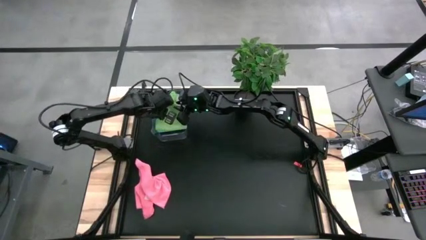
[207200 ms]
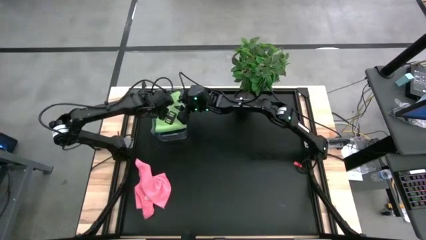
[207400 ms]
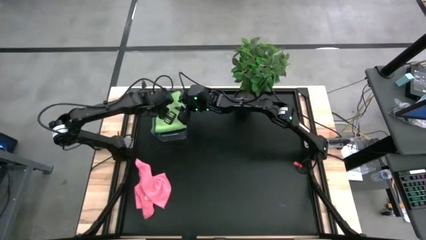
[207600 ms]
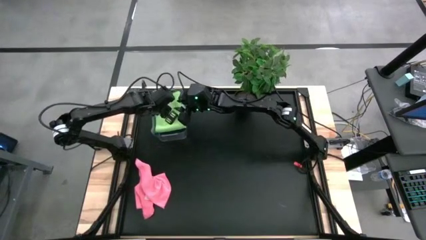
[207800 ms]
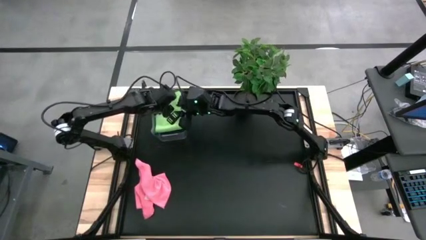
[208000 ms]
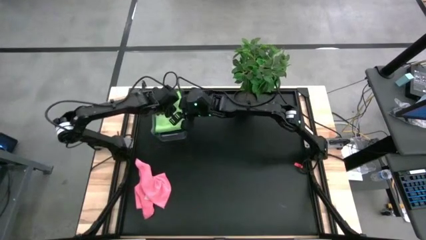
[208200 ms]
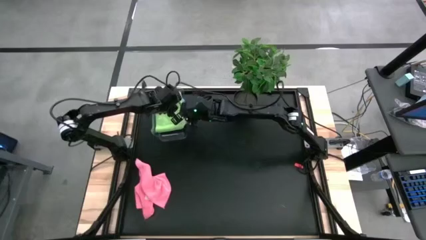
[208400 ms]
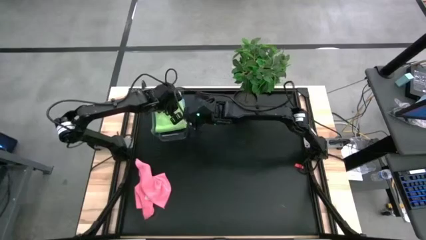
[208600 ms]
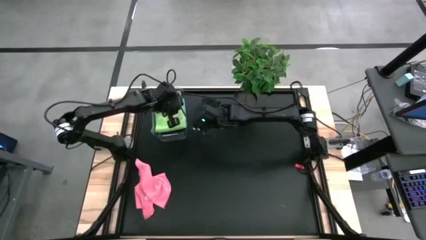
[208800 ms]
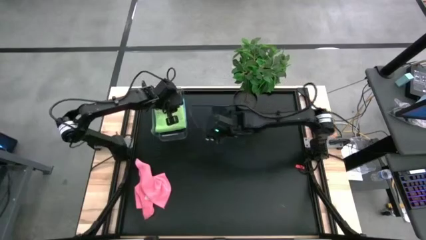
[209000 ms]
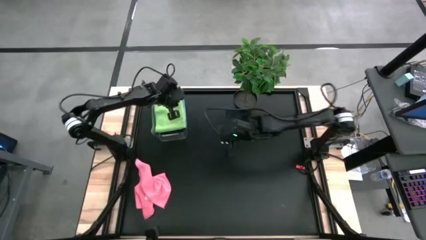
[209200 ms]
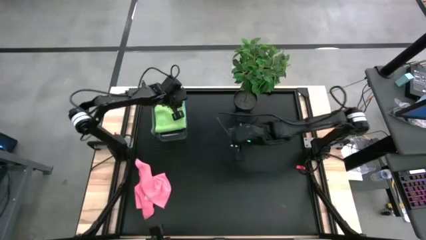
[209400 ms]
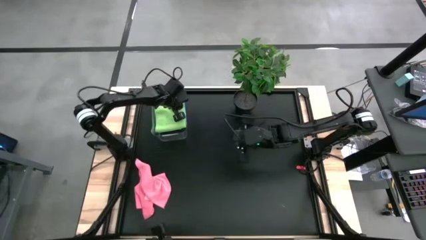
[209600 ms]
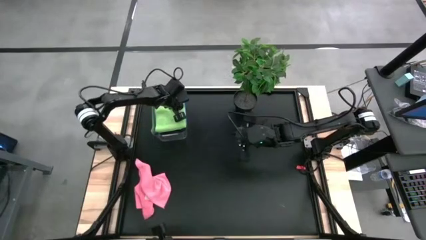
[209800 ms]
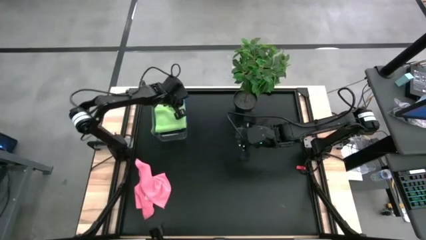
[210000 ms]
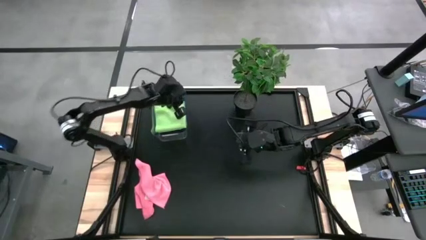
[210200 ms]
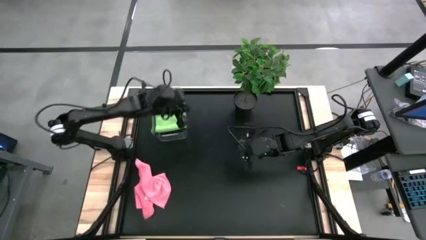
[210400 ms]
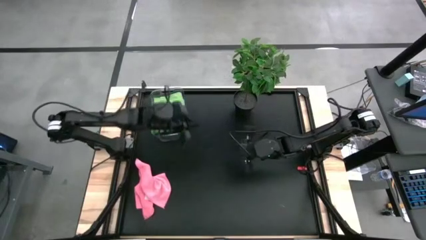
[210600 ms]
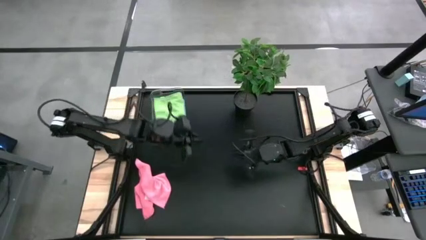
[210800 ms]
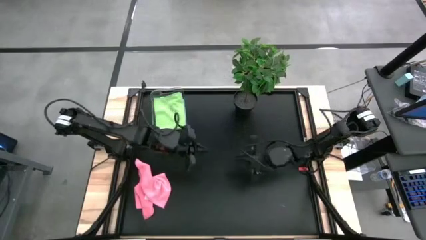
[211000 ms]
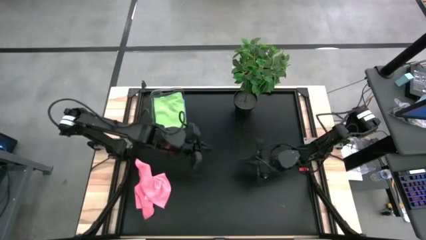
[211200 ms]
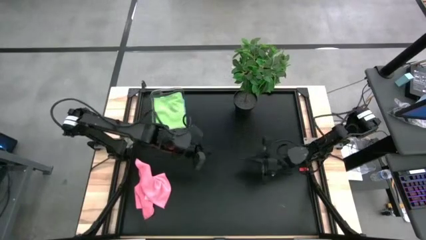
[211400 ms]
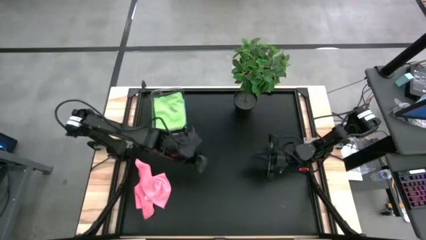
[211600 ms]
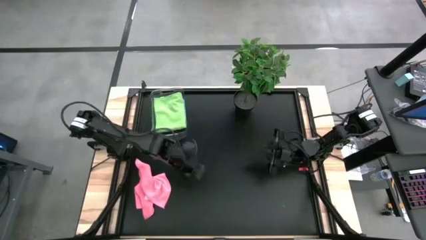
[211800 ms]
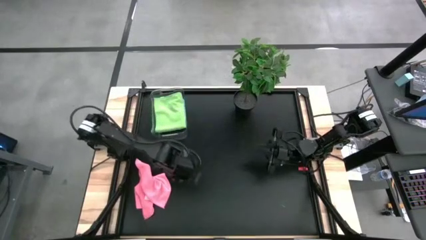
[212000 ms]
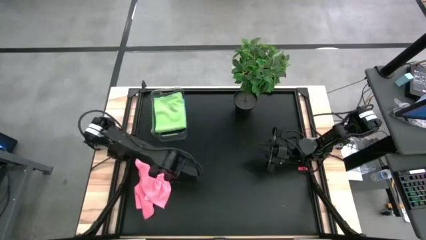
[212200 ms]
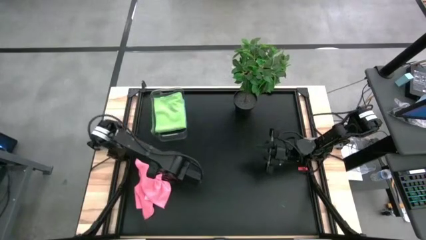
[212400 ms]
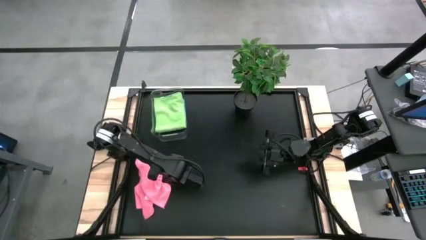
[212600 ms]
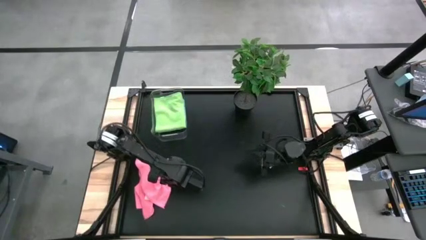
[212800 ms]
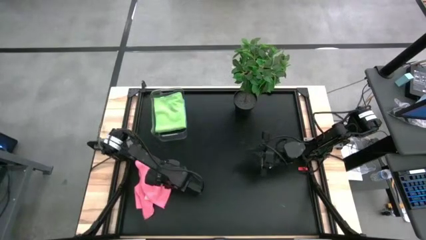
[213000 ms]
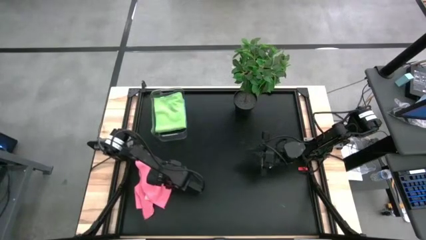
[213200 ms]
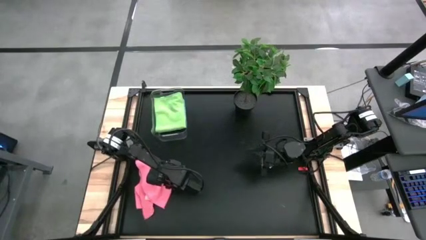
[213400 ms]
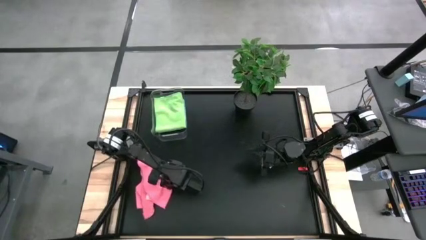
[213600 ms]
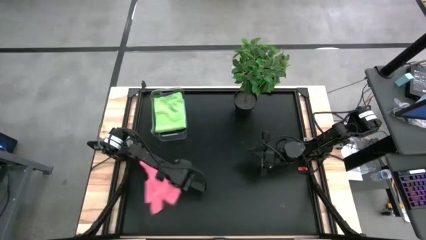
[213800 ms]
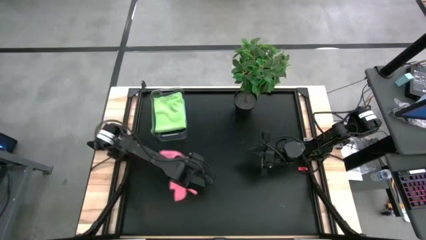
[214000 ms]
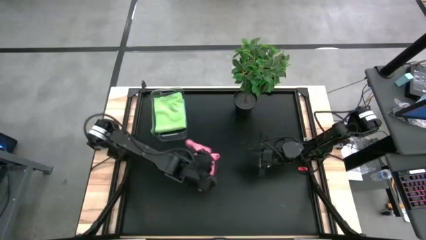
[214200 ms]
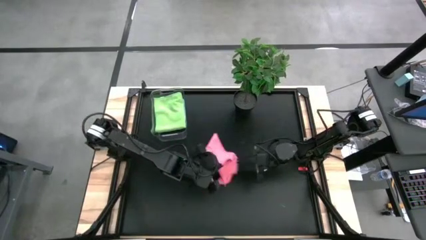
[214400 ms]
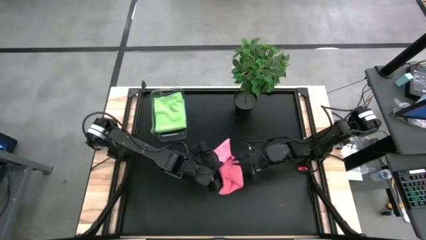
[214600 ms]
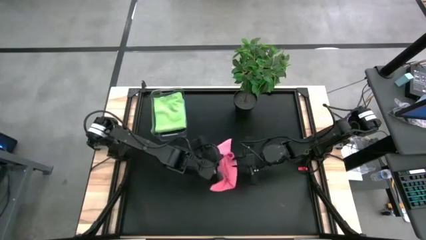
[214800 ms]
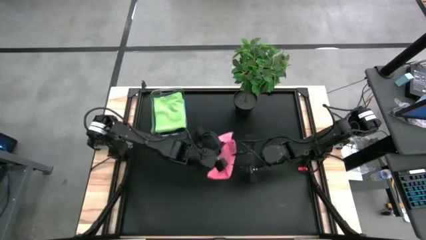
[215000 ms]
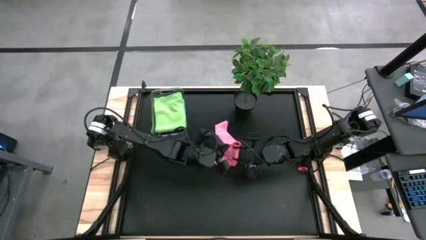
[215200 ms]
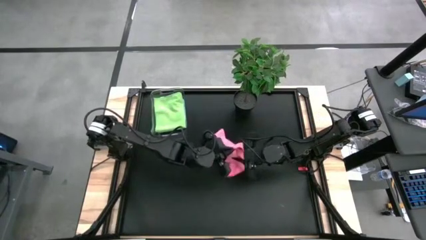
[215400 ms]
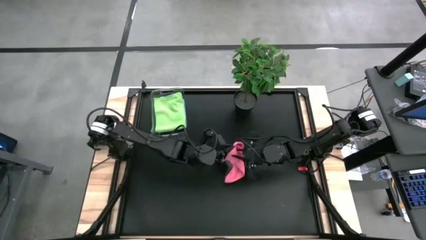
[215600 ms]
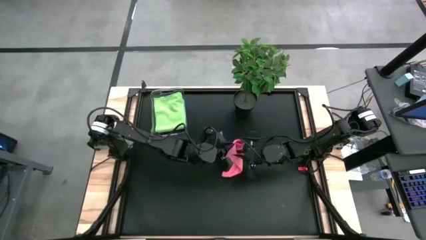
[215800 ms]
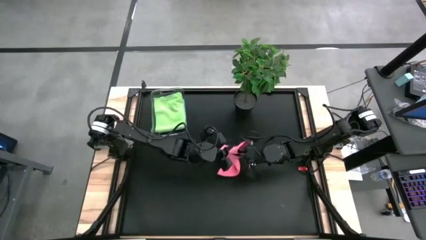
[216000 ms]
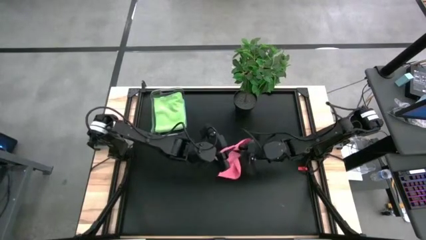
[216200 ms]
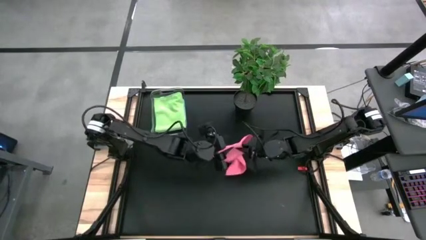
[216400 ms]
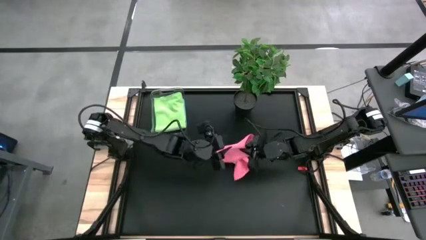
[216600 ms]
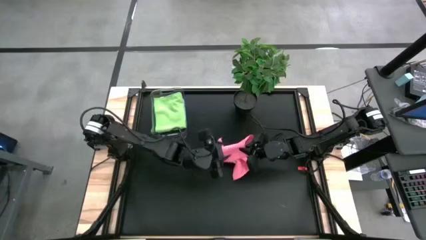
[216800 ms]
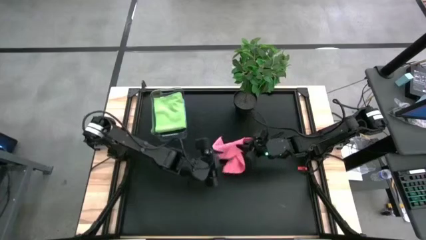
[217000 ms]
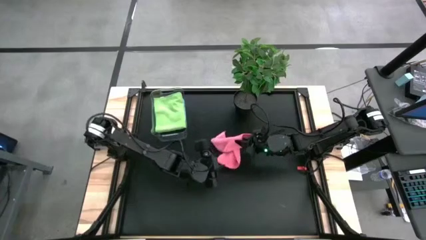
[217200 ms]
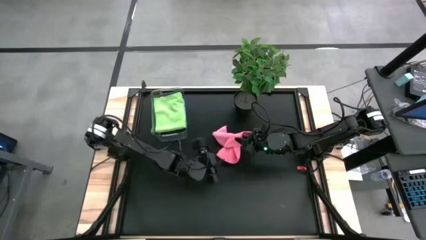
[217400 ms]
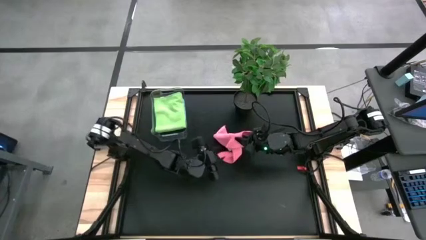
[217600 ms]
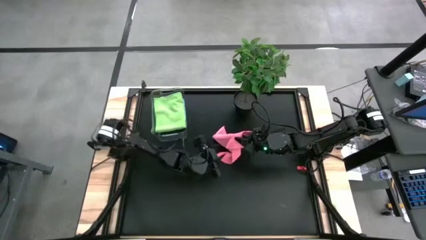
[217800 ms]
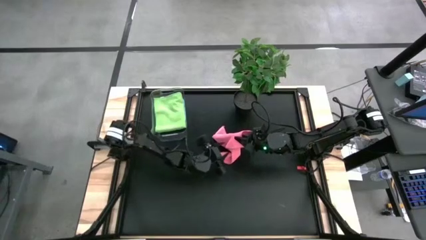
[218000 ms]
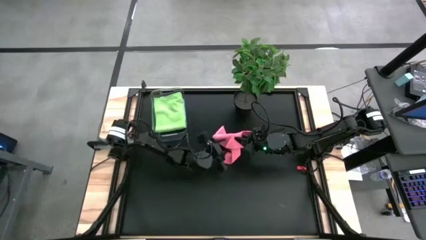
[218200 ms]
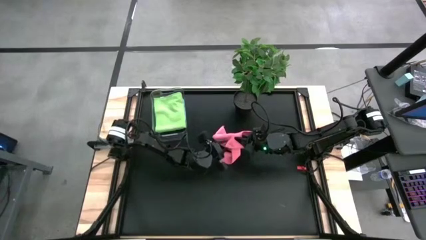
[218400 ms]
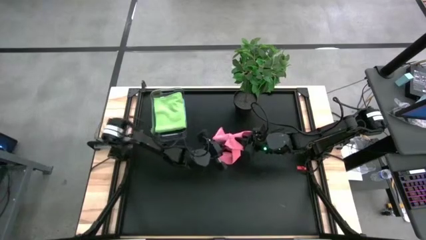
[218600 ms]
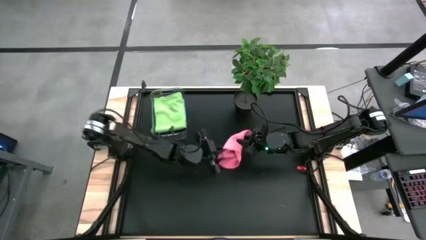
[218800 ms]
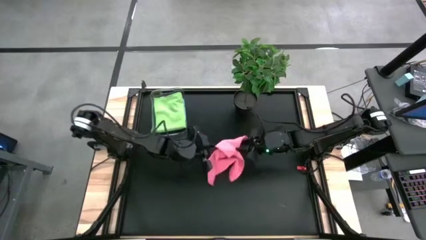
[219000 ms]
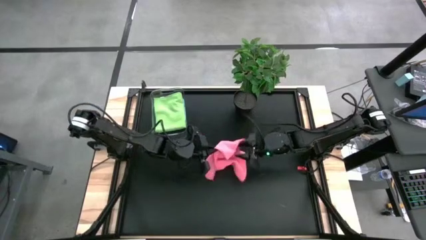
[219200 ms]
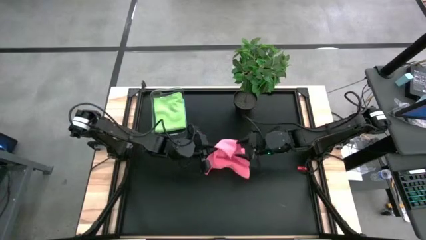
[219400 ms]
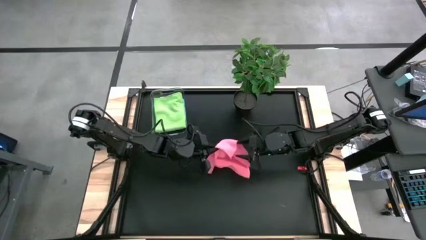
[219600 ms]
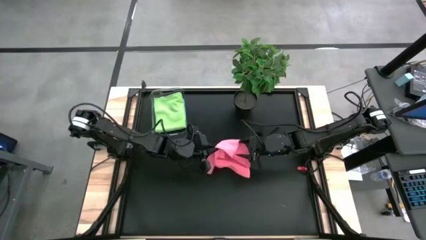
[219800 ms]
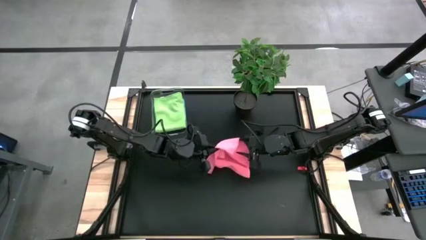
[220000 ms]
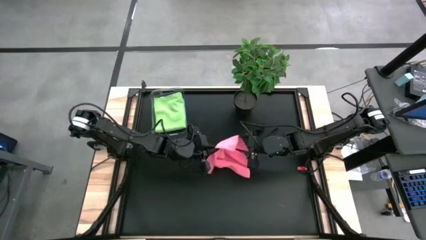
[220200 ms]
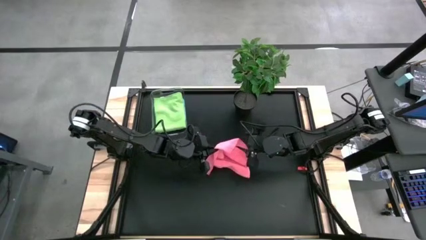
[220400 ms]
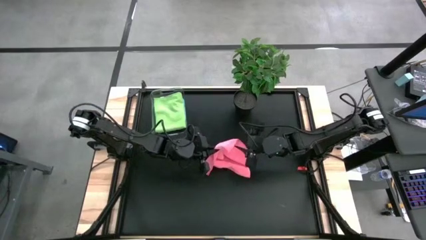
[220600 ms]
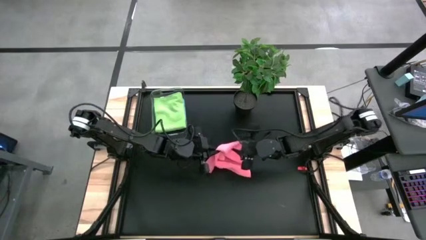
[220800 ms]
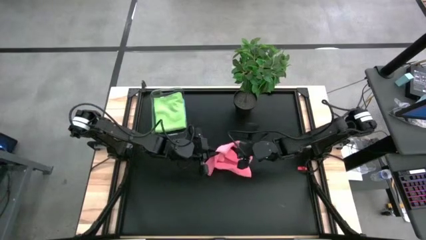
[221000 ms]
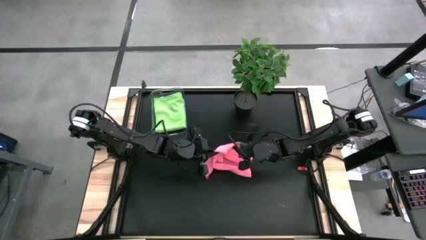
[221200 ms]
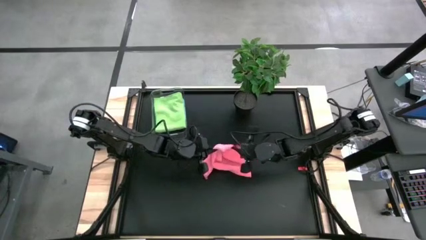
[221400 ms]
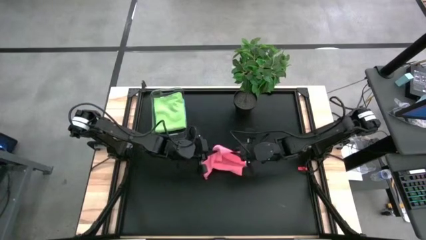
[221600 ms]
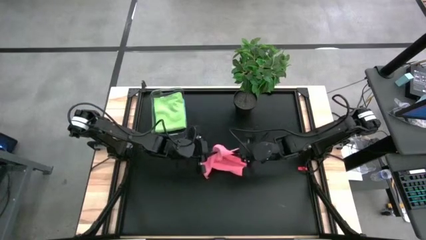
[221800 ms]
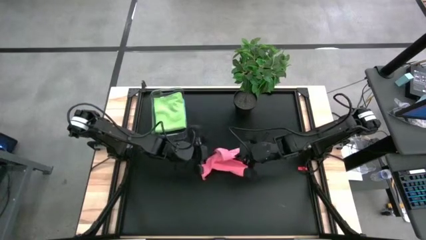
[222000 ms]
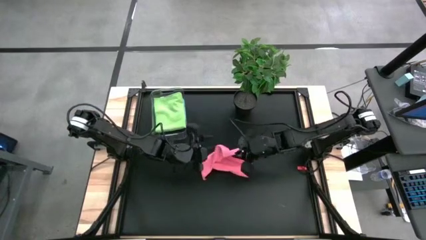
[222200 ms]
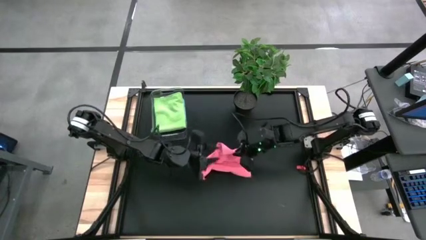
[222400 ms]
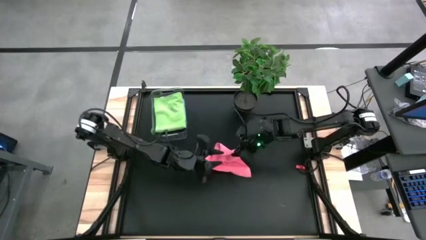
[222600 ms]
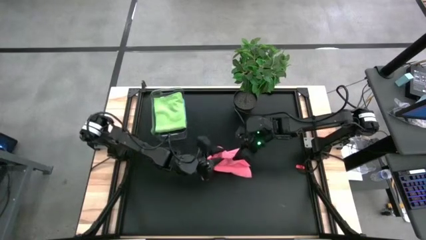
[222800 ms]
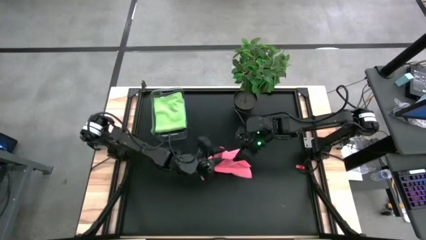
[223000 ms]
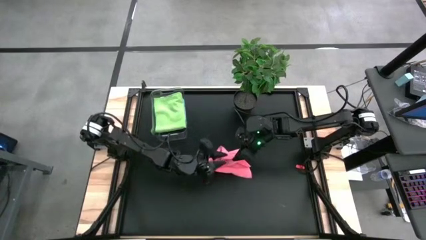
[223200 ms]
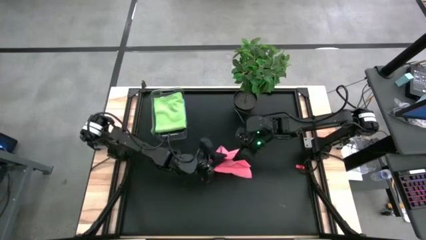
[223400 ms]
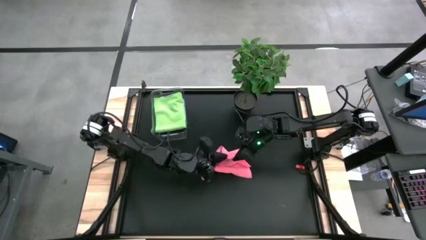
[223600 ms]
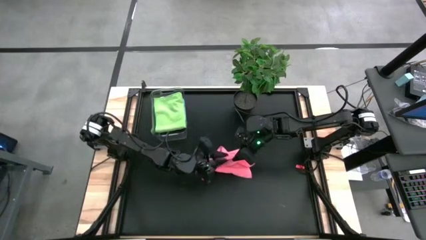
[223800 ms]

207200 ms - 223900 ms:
Task: Fold microfiber towels
Fold the pink microfiber towel
